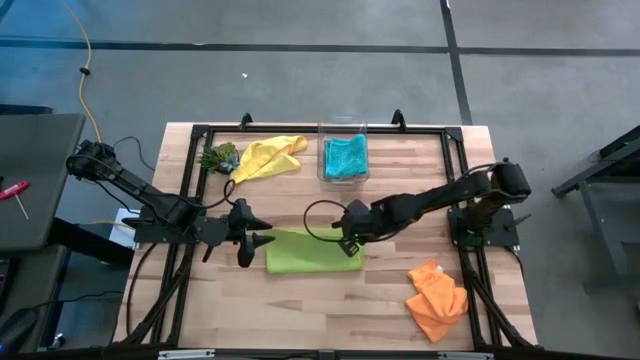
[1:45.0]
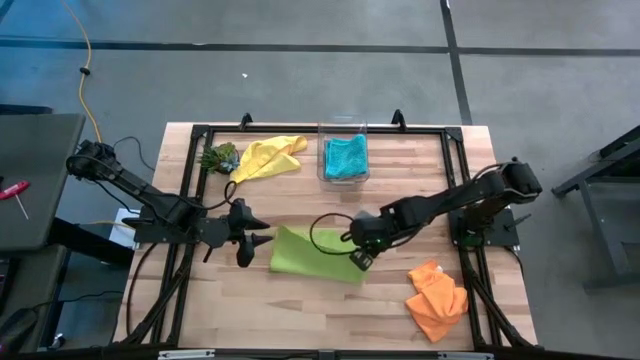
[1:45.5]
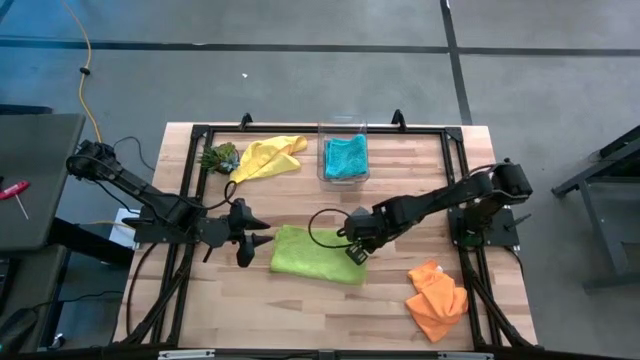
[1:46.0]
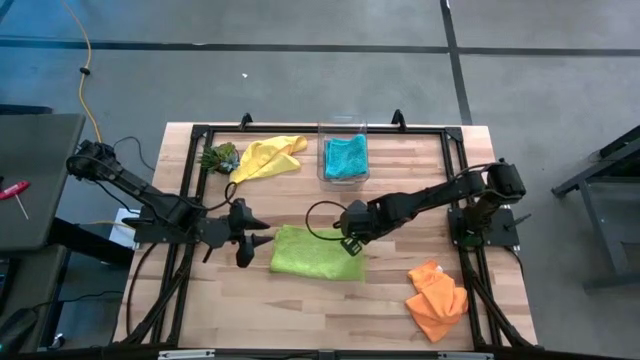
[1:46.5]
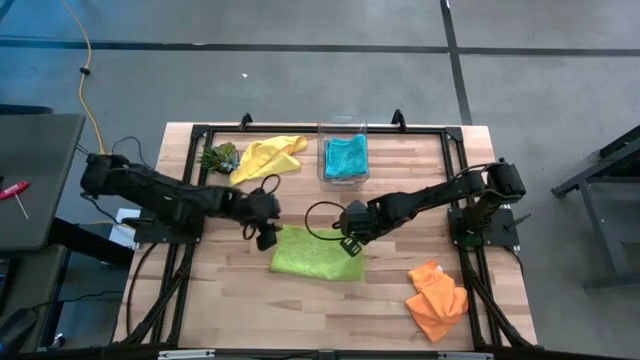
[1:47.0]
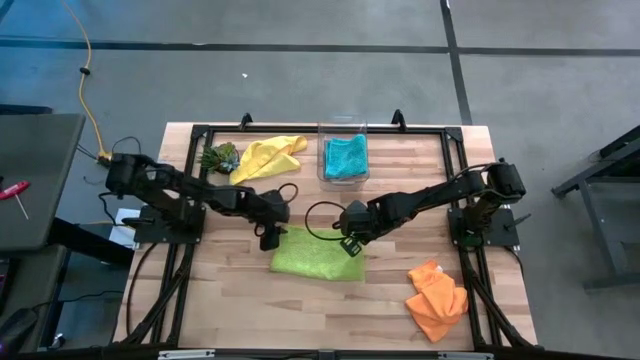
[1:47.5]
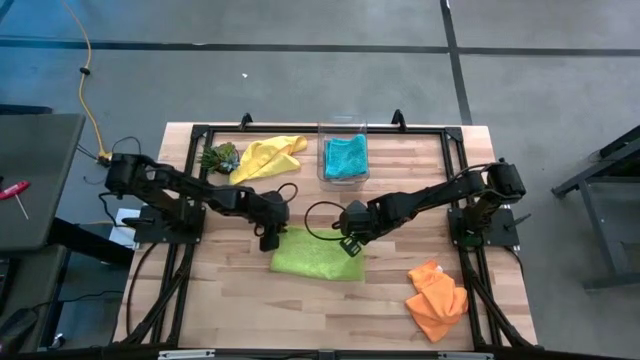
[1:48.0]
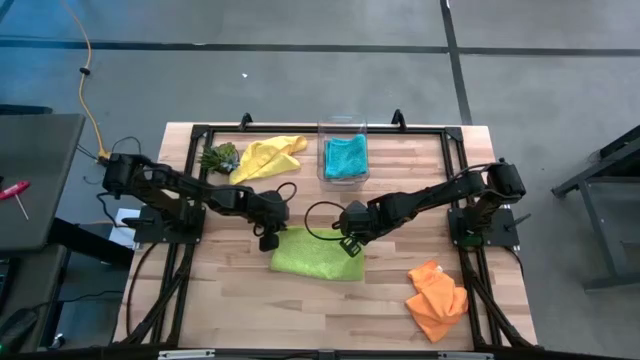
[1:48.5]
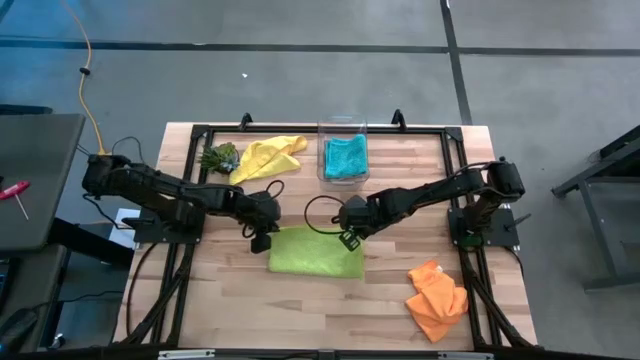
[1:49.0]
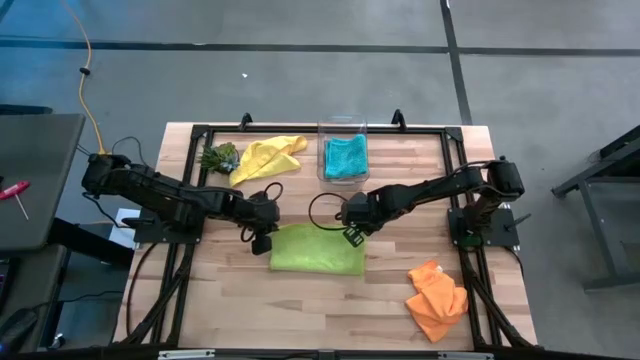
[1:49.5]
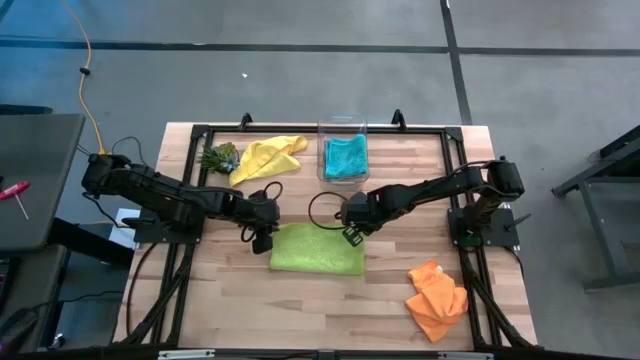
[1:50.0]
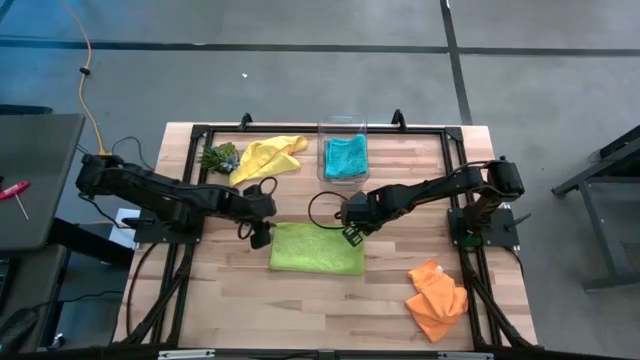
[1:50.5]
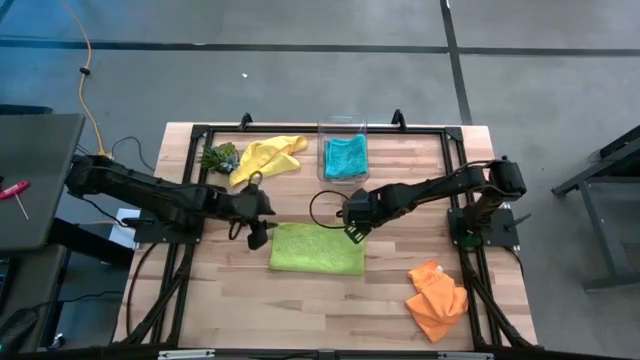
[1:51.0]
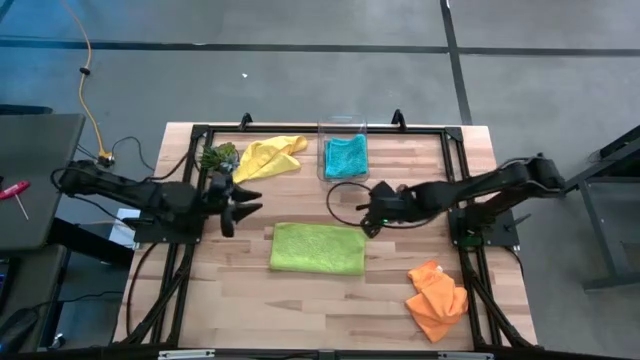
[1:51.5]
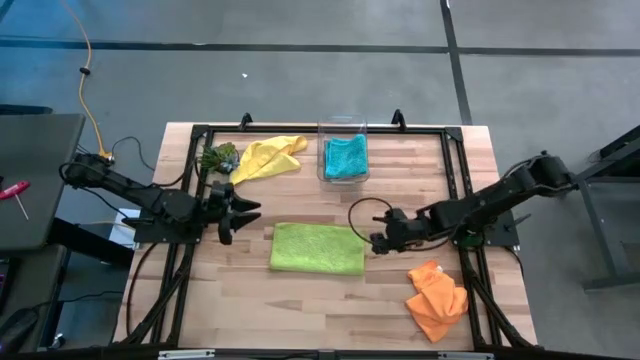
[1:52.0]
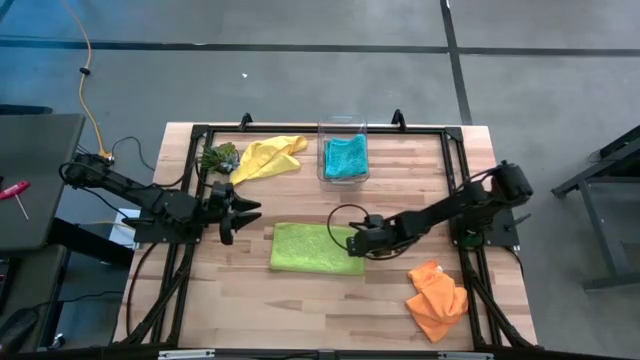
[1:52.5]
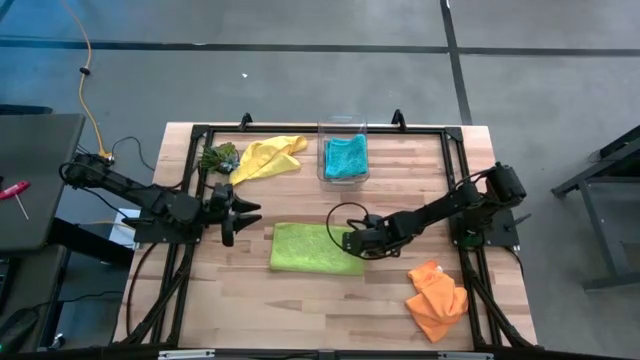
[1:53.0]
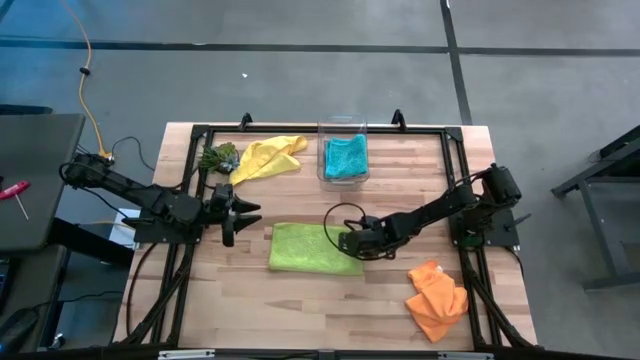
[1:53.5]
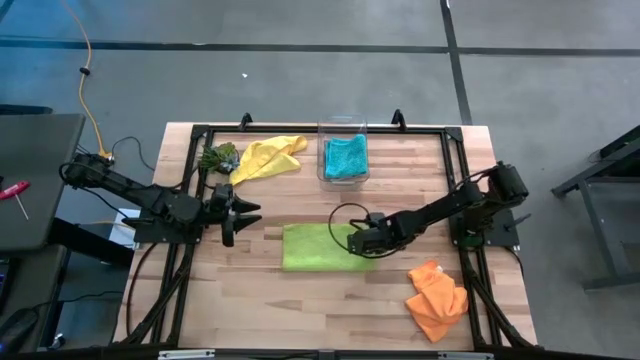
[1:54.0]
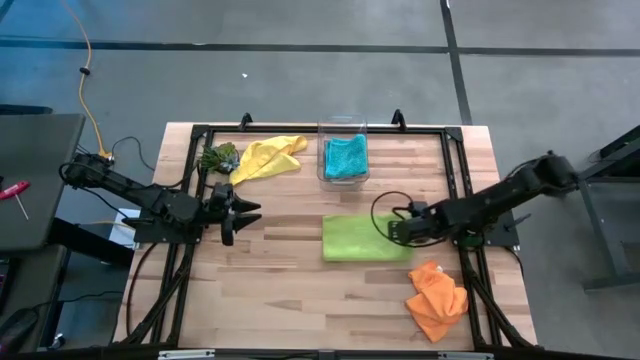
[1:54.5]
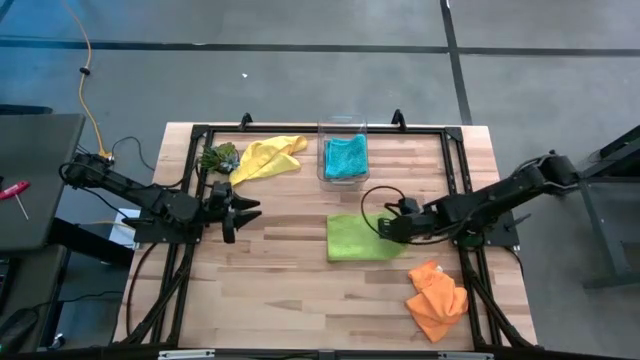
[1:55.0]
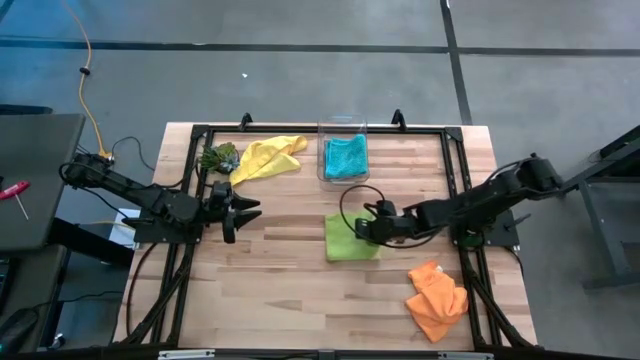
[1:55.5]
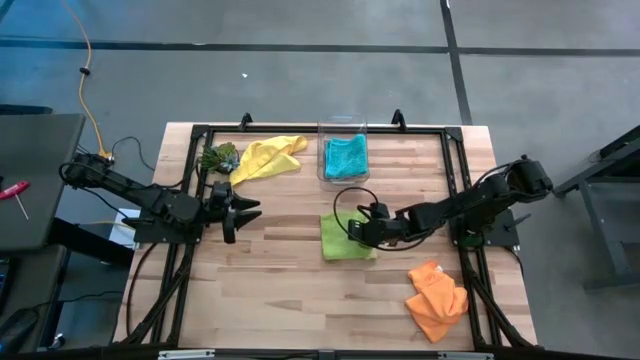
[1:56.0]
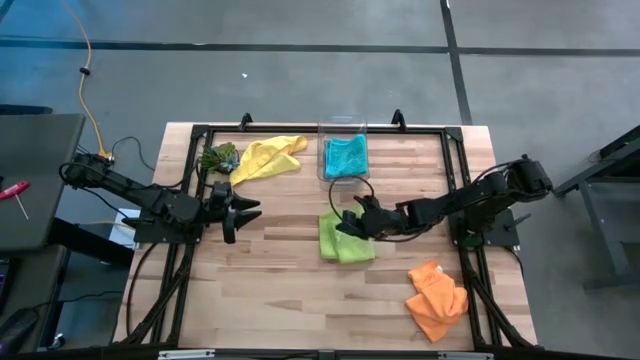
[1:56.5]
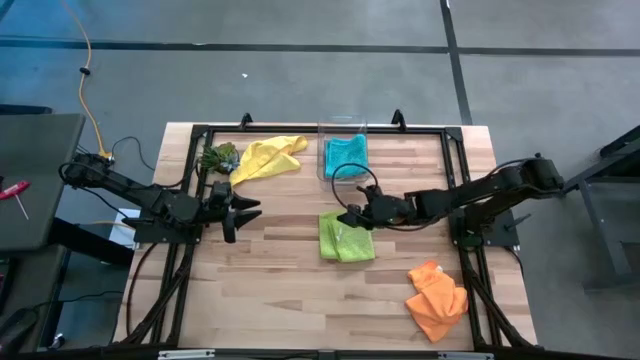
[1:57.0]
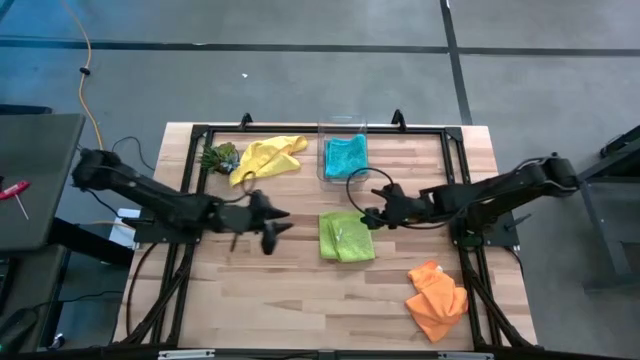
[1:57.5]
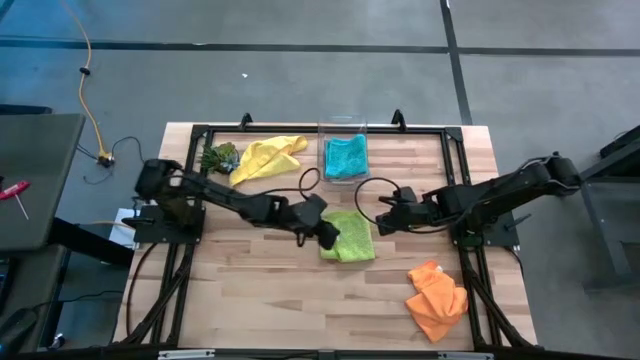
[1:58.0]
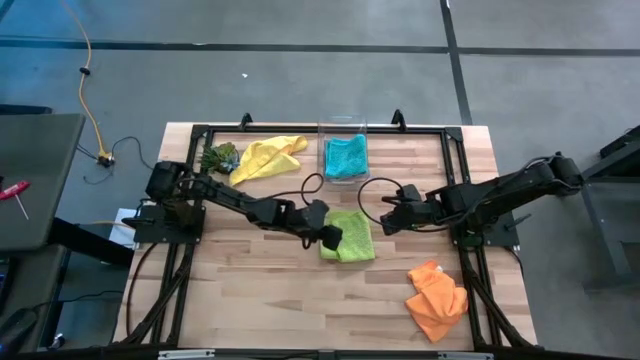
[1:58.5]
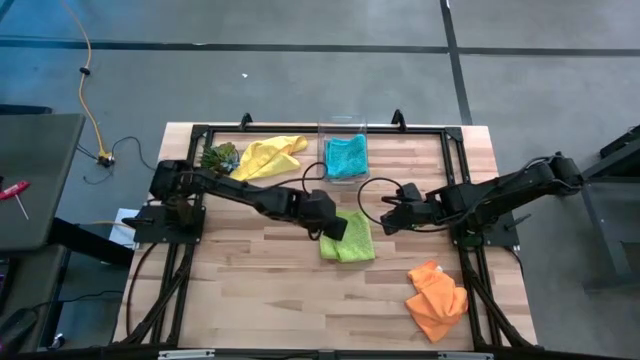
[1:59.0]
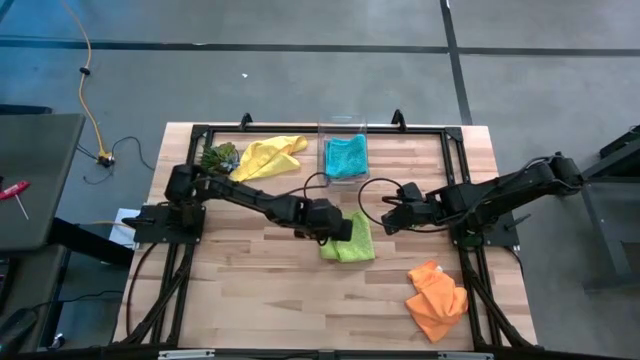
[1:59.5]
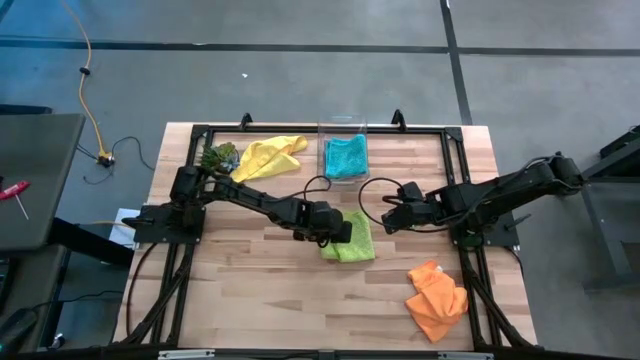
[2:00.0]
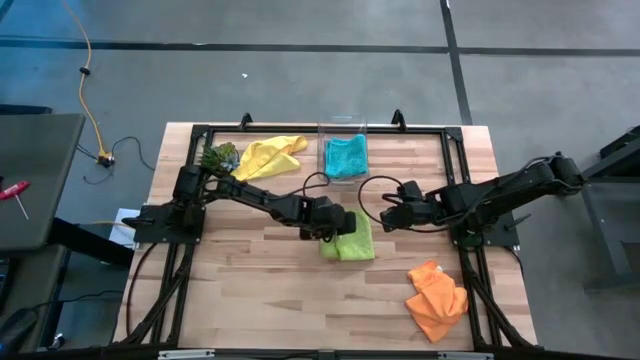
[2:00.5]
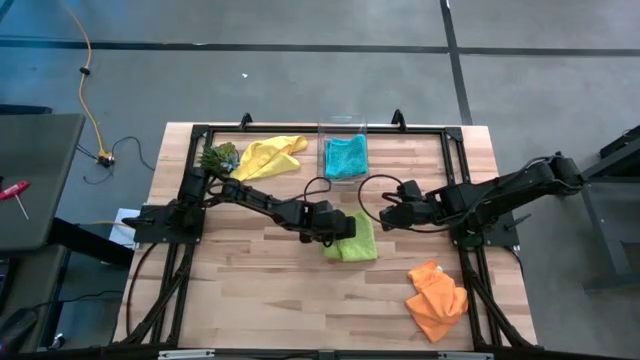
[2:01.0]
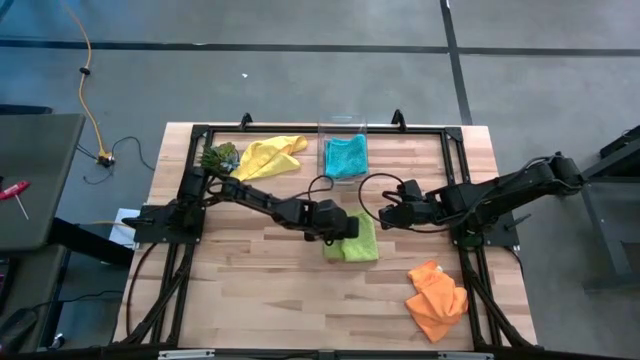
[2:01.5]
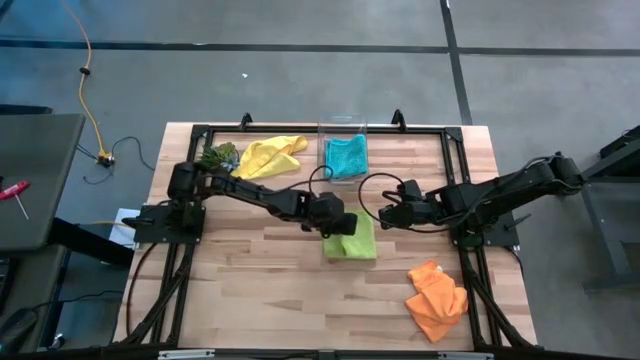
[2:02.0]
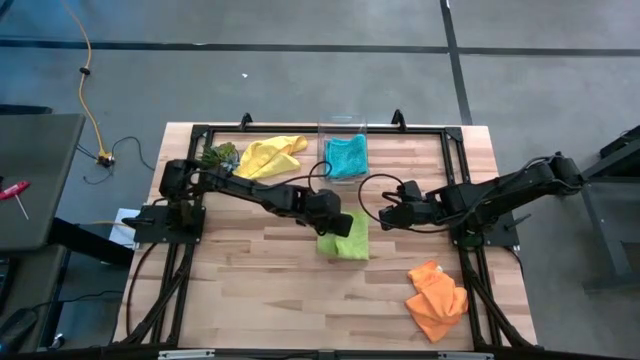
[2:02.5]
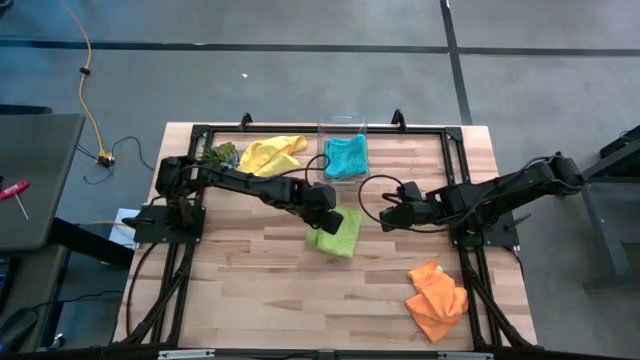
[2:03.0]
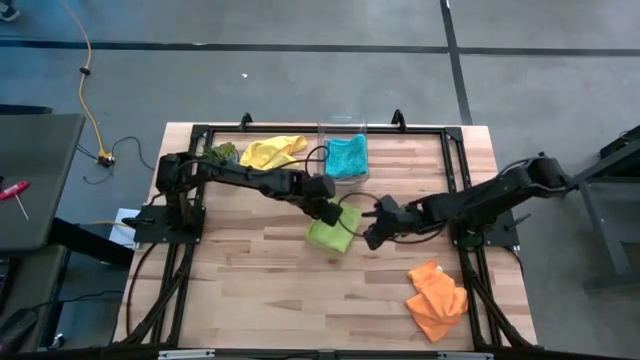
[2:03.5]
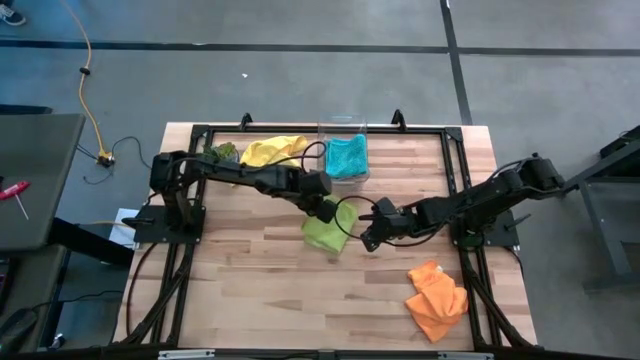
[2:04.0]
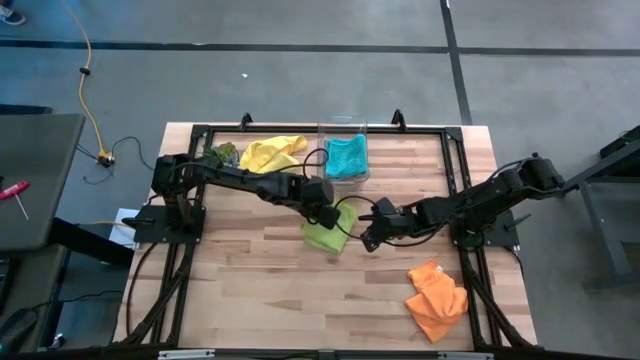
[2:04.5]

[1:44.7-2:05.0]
Task: Fold microfiber towels
Fold the green microfiber cloth
